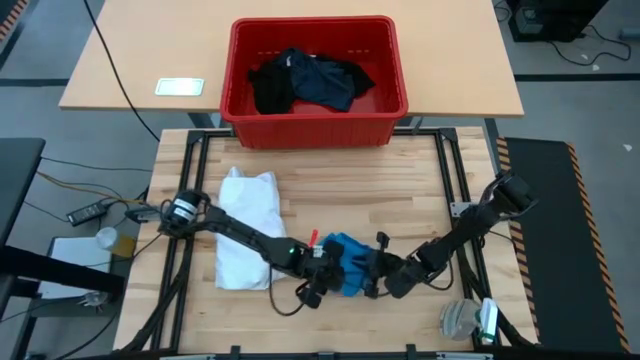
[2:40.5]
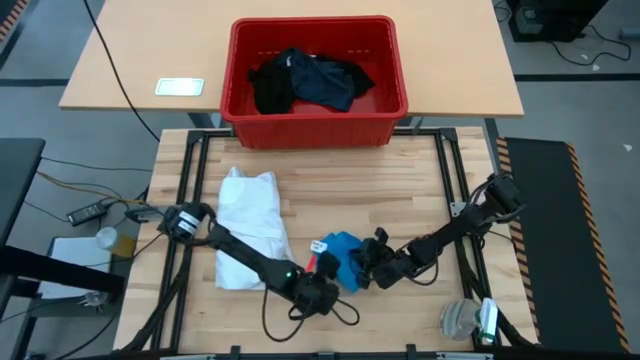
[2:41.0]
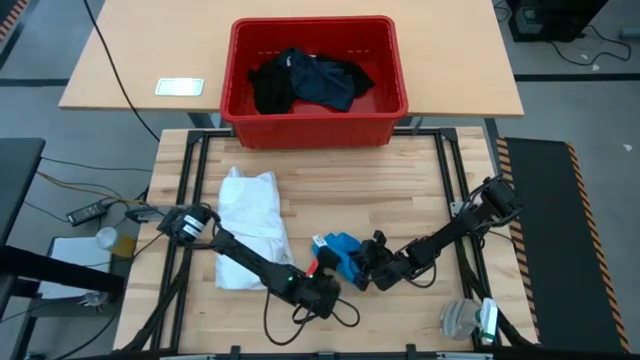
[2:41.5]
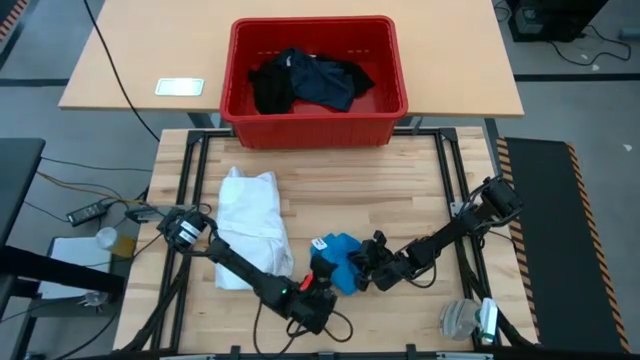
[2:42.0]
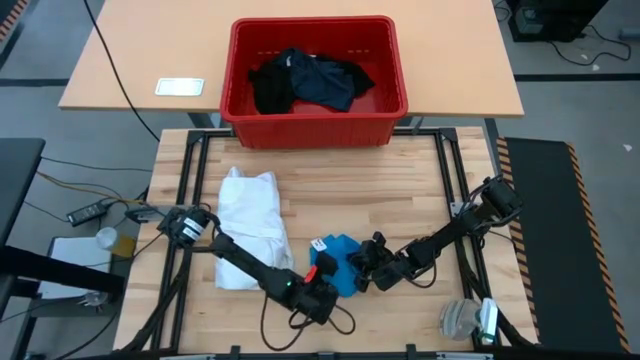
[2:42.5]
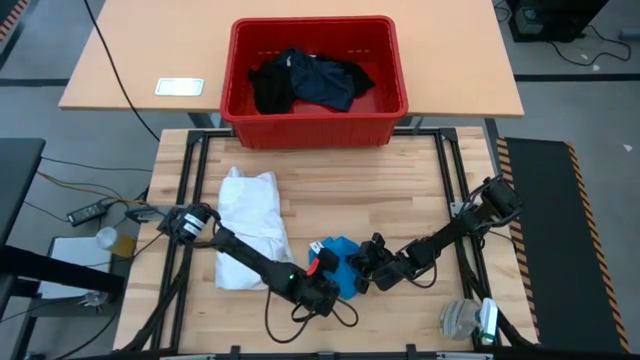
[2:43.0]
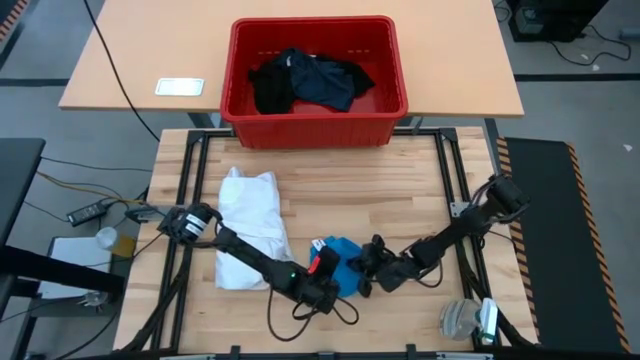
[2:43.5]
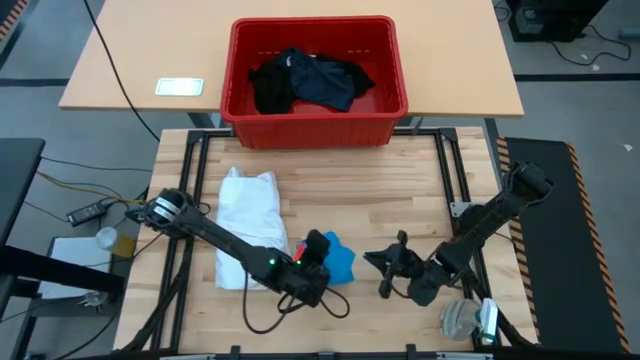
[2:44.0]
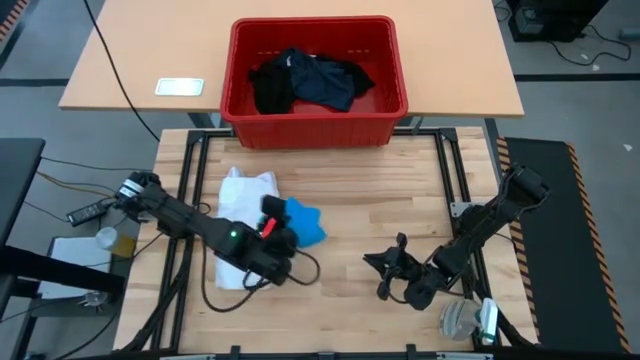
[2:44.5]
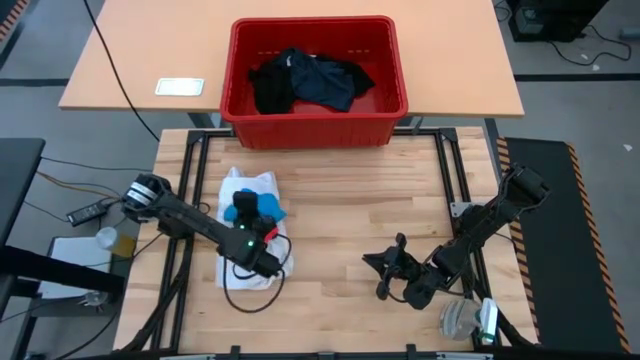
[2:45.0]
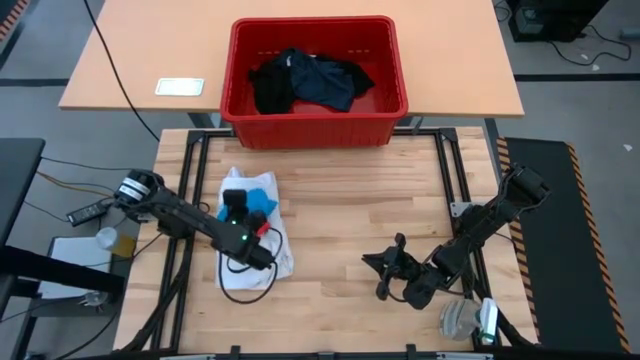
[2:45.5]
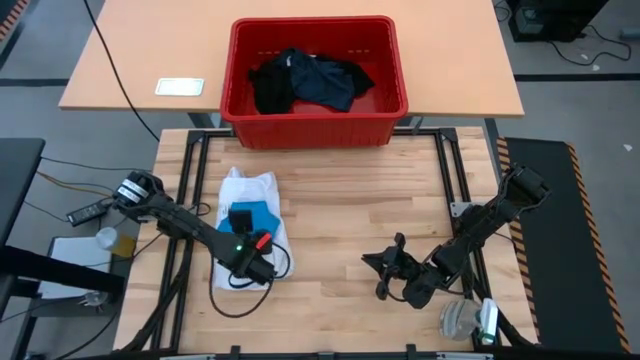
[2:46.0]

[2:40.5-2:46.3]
Task: Fold laundry
Stack the folded blue underwear on top of the white polo

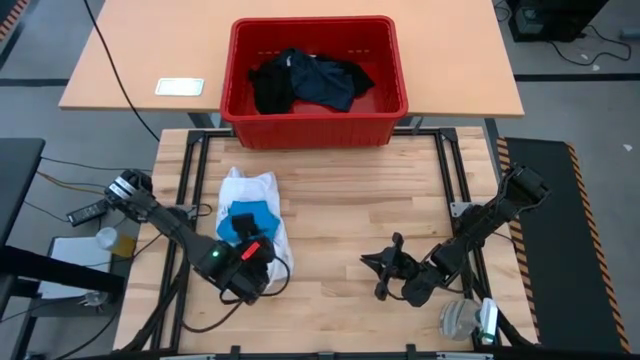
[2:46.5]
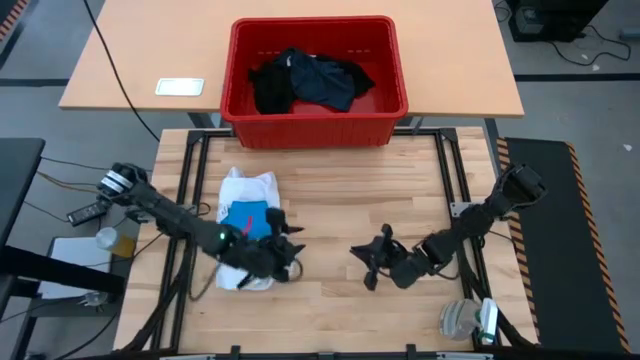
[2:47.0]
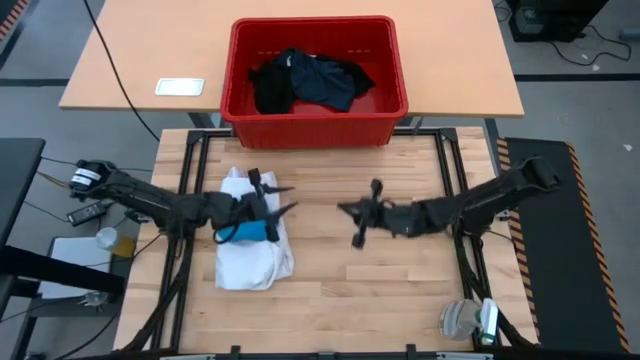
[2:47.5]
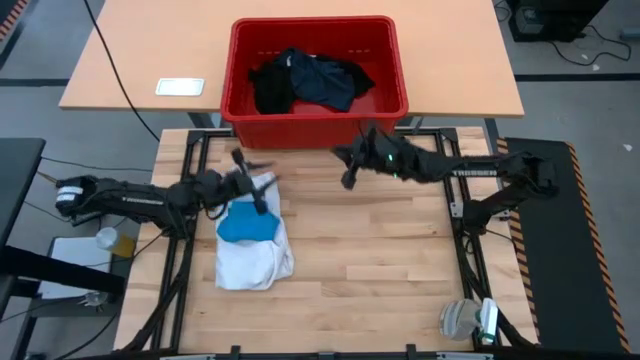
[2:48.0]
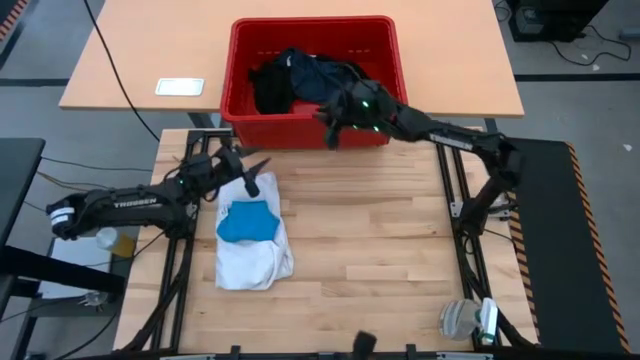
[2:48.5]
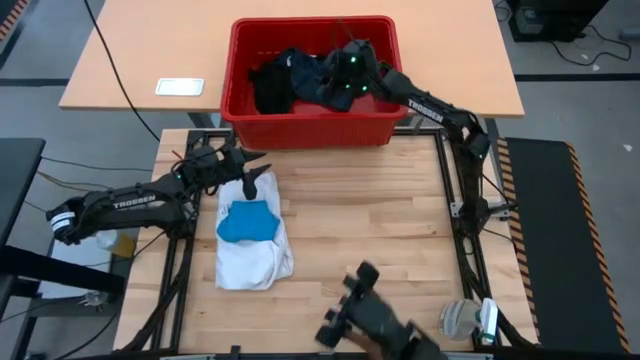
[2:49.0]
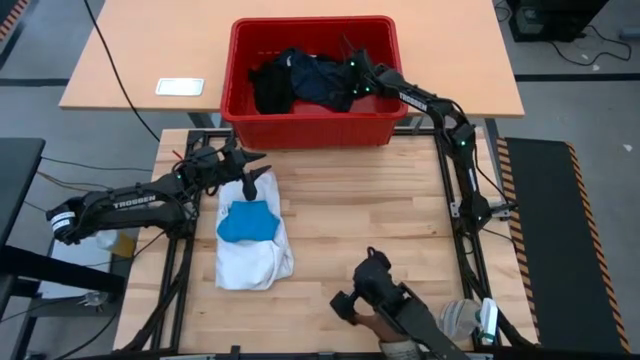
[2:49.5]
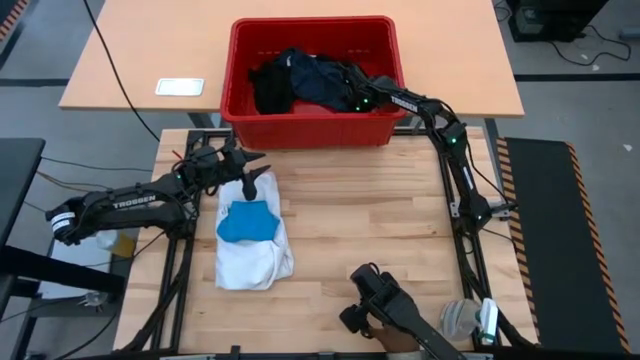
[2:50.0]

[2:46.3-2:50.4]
Fold the dark blue underwear

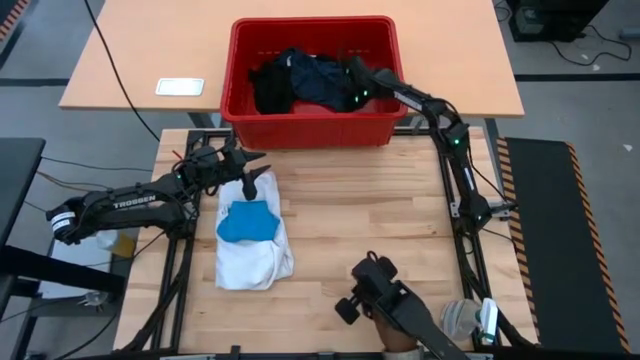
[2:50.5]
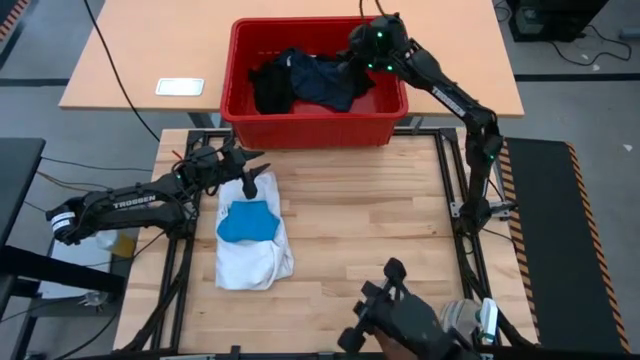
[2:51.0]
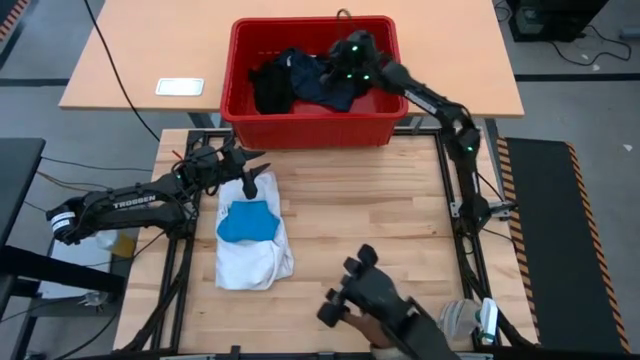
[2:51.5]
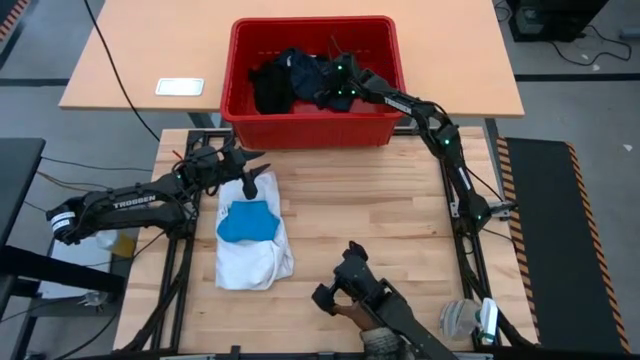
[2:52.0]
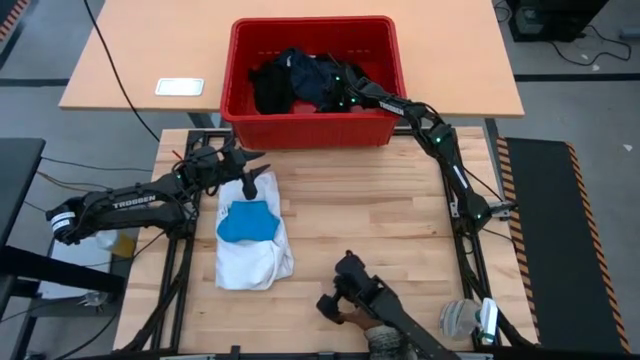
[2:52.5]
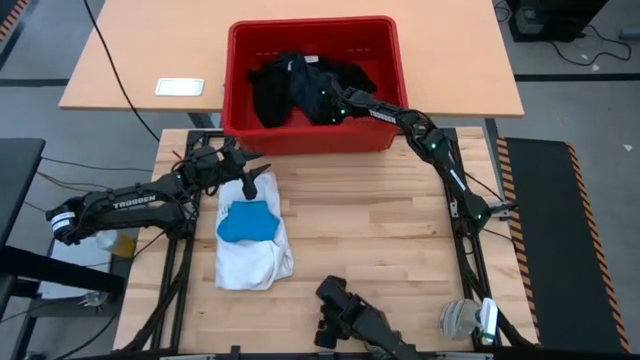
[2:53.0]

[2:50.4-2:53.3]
Fold the dark blue underwear

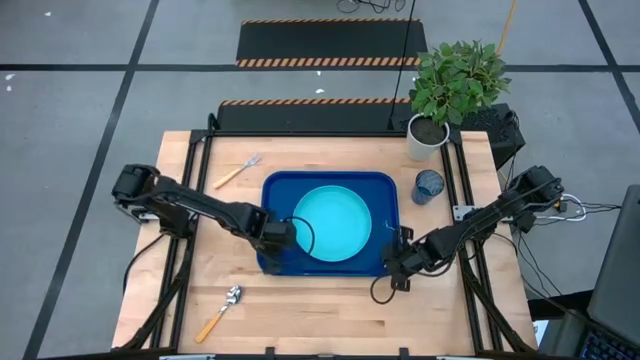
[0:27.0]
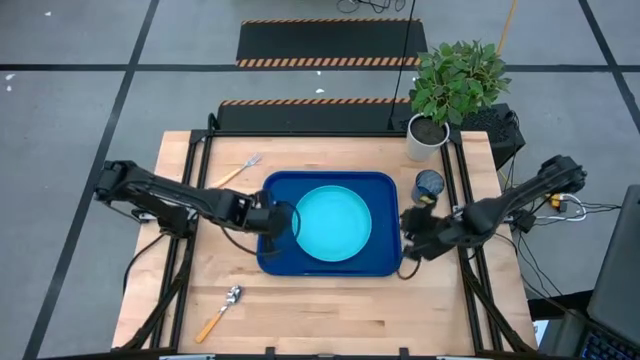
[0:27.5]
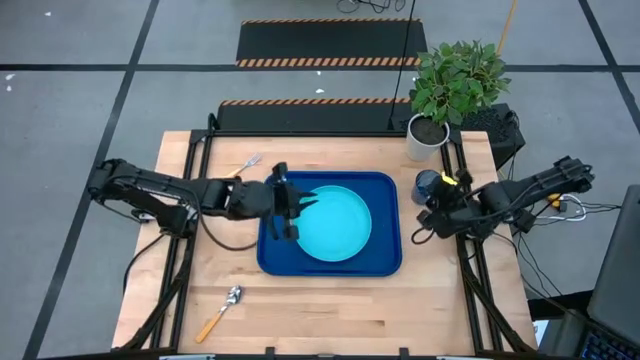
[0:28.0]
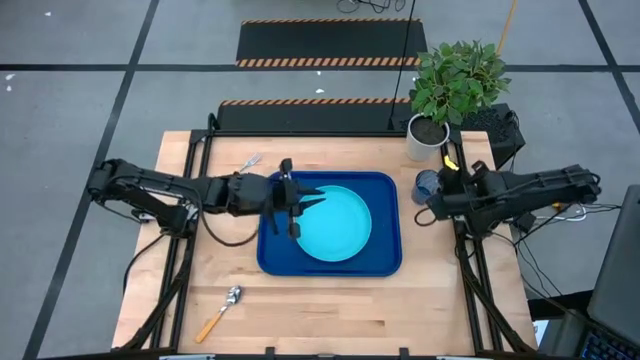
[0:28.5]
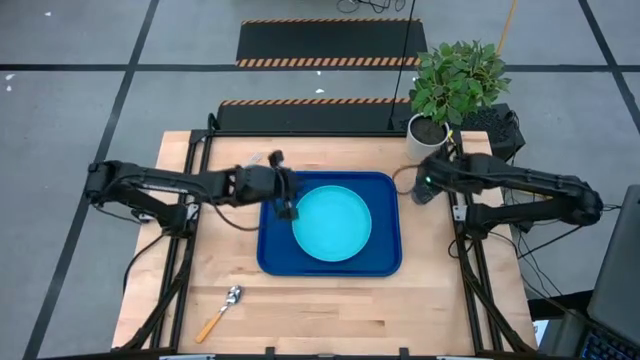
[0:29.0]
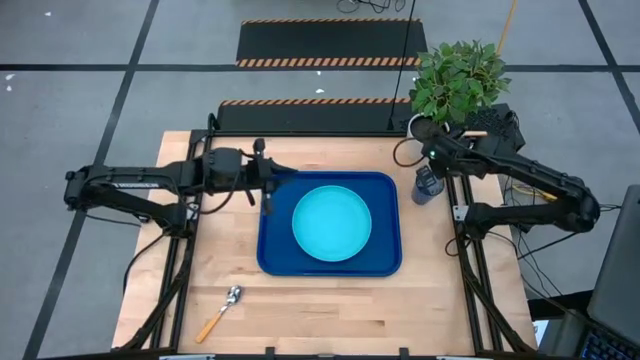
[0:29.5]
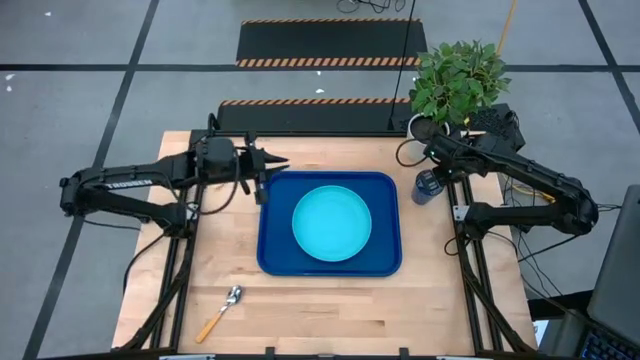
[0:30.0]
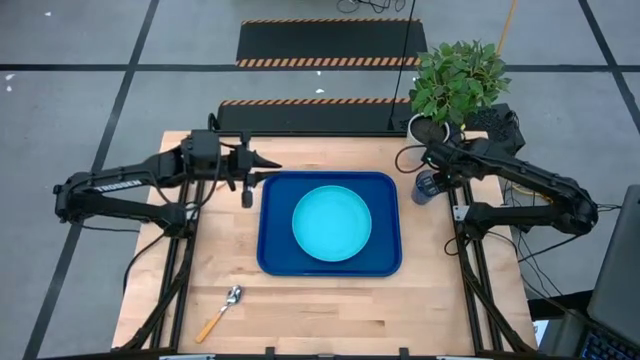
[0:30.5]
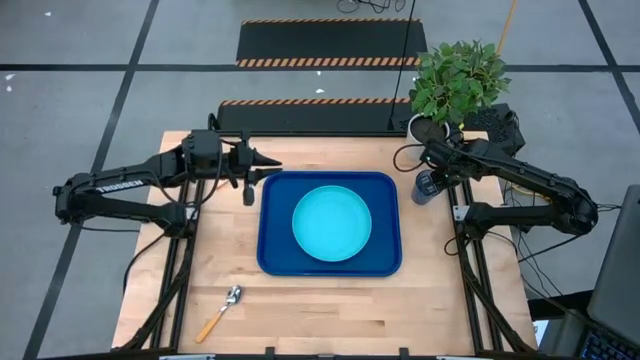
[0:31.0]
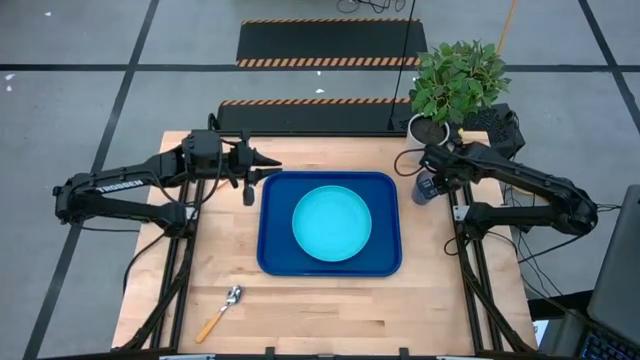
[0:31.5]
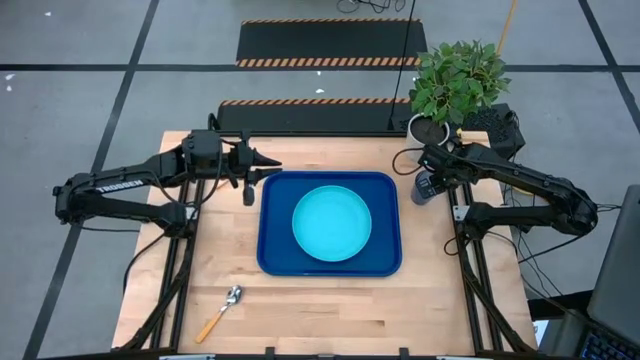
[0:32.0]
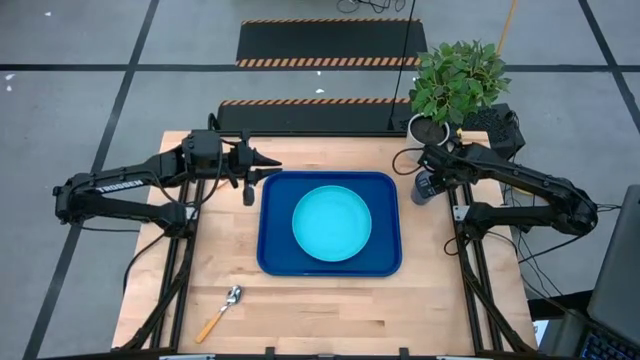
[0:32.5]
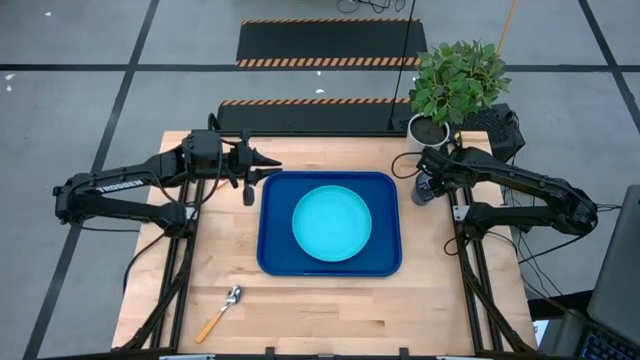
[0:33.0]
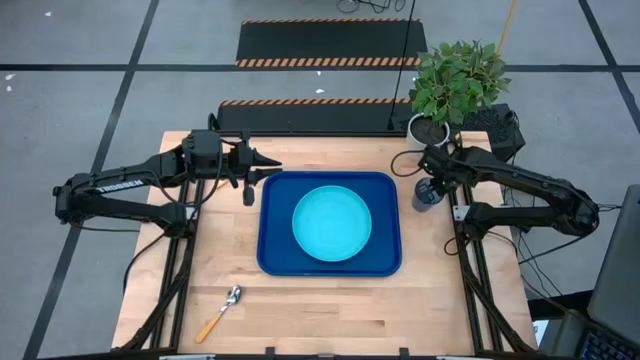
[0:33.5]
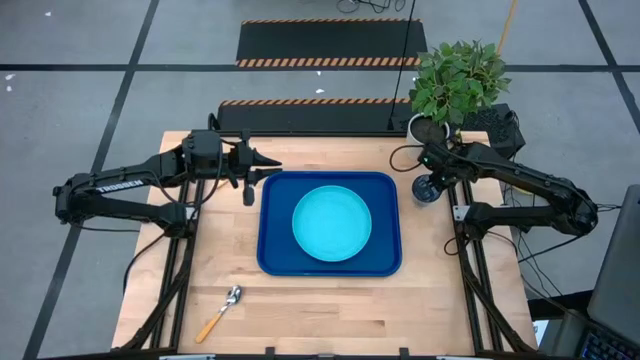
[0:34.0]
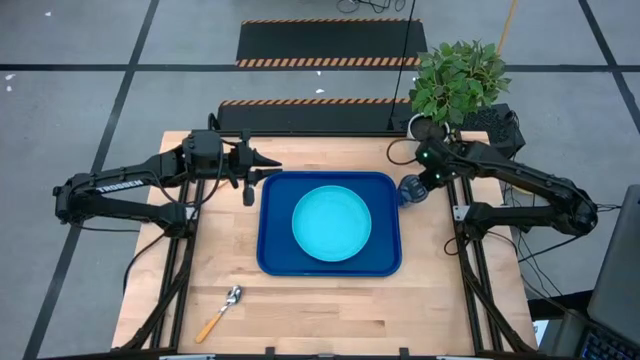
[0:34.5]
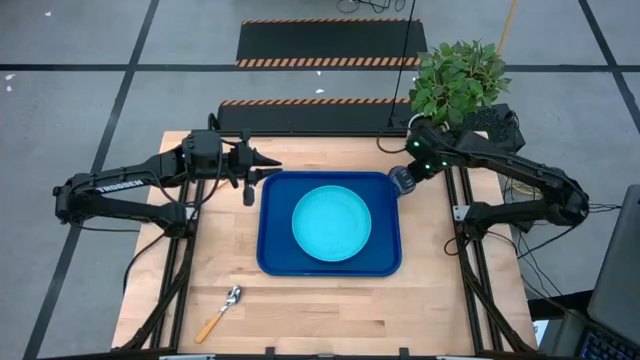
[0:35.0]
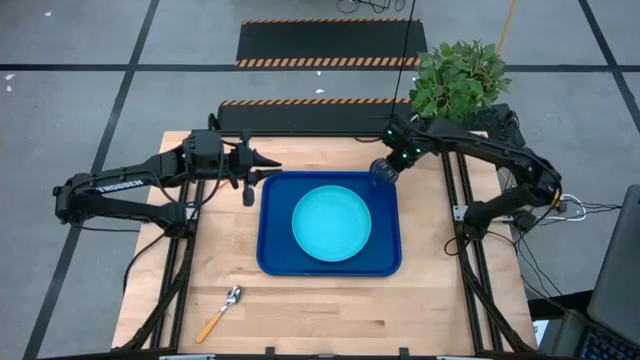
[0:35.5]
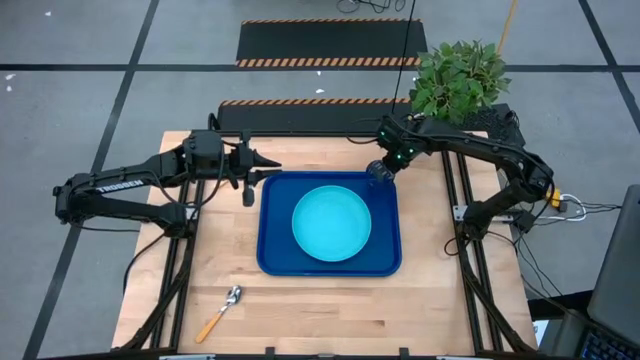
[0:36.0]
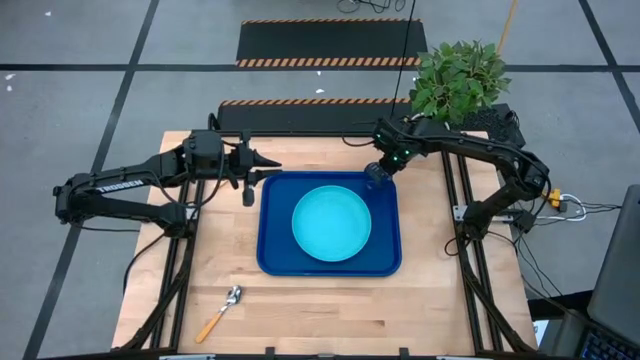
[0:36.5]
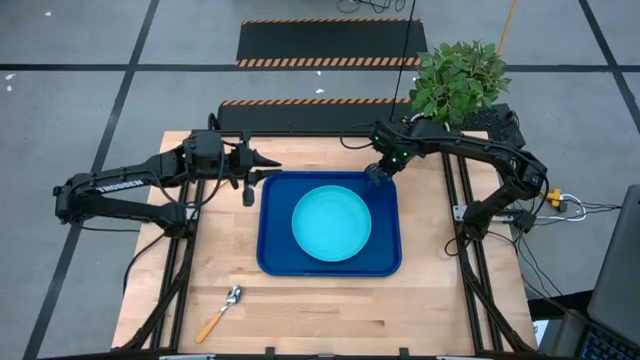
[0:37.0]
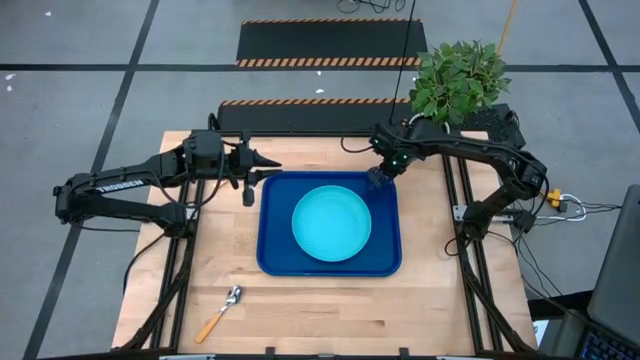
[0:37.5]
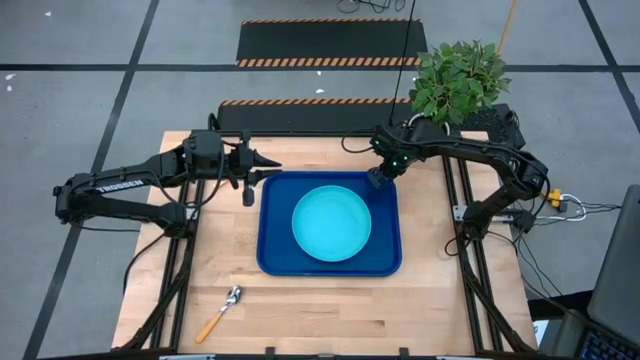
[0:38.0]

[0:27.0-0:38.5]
Task: Pick and place plate/cup/fork/spoon on tray
Put the blue cup on the blue tray to the top right of the light blue plate
